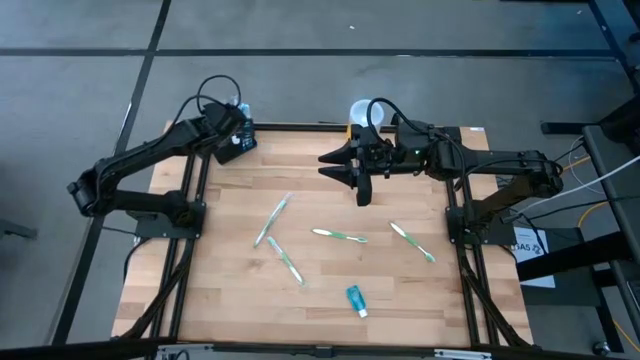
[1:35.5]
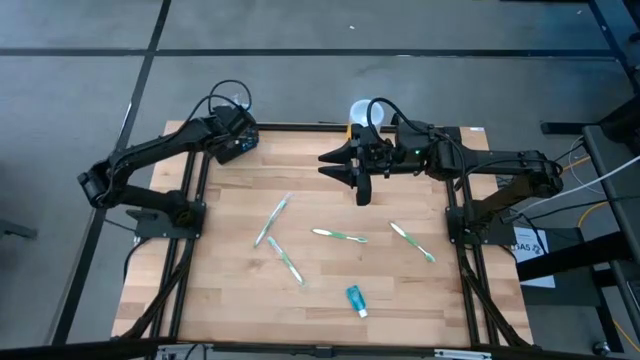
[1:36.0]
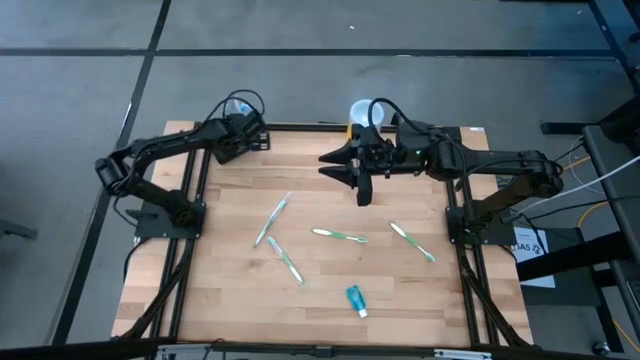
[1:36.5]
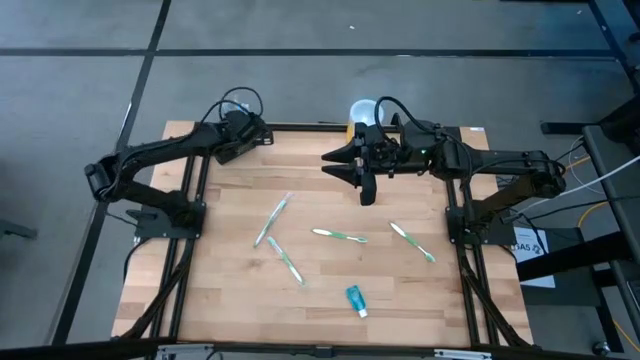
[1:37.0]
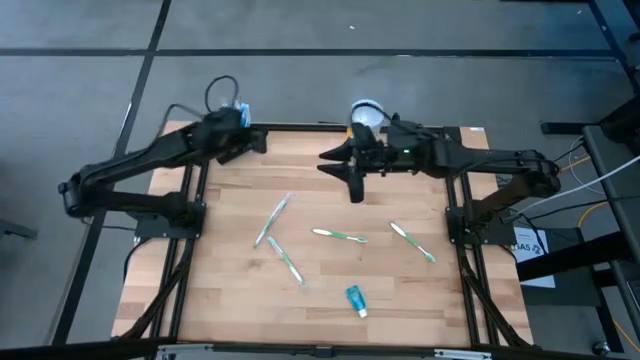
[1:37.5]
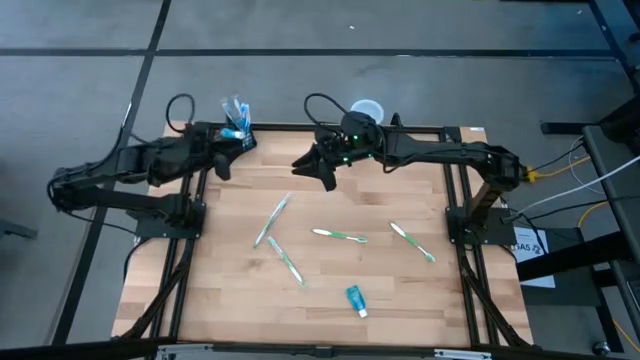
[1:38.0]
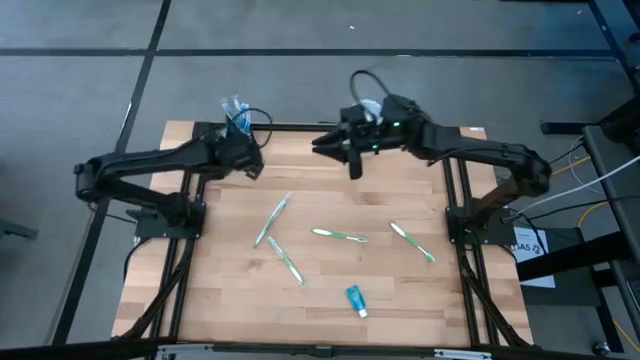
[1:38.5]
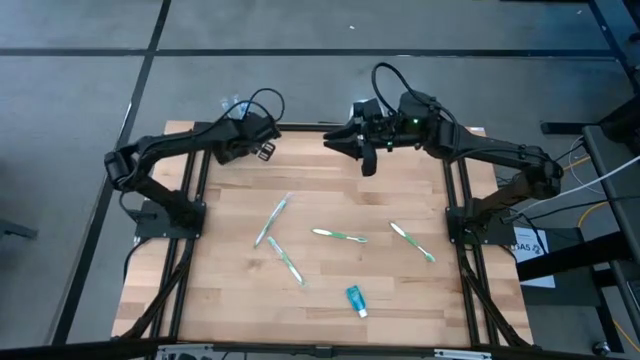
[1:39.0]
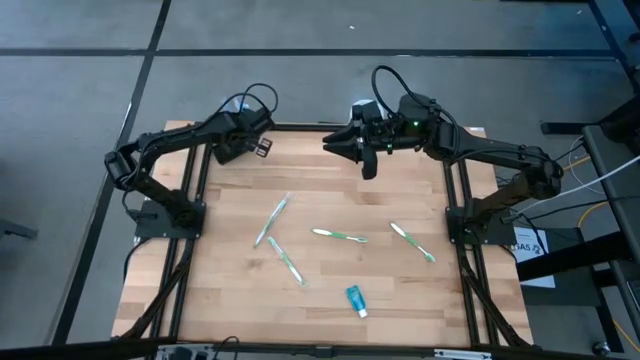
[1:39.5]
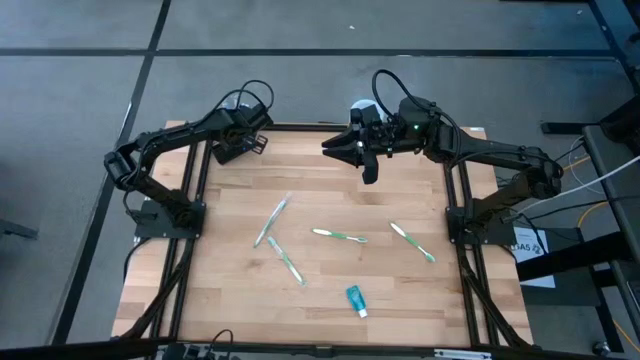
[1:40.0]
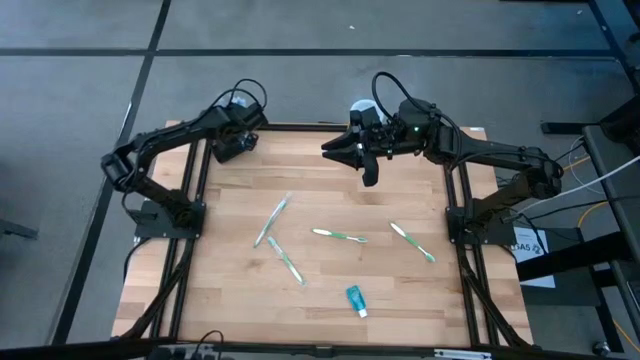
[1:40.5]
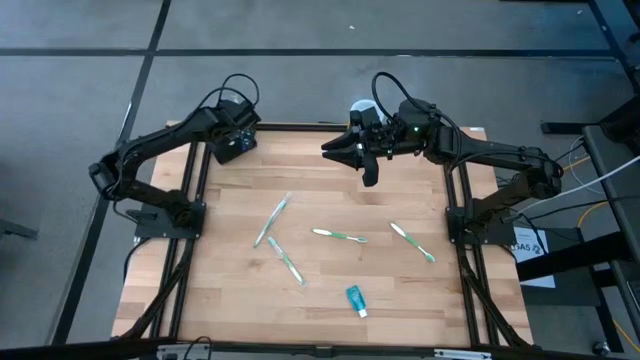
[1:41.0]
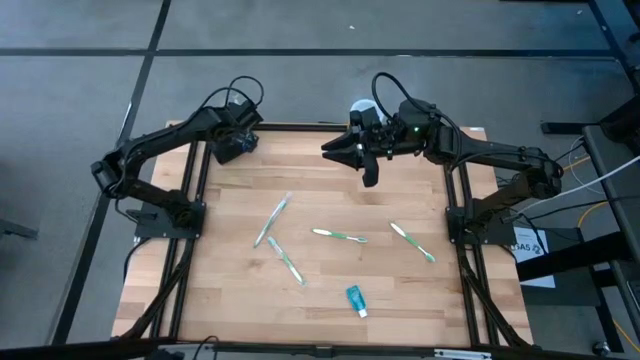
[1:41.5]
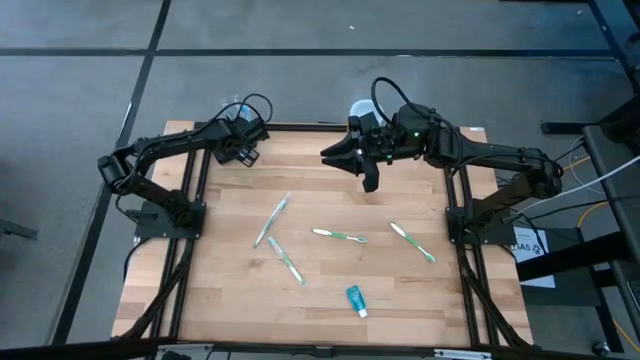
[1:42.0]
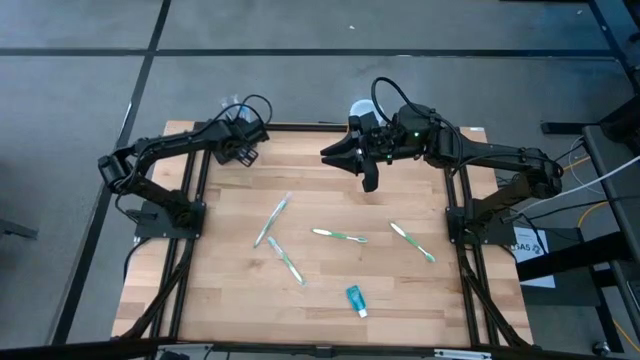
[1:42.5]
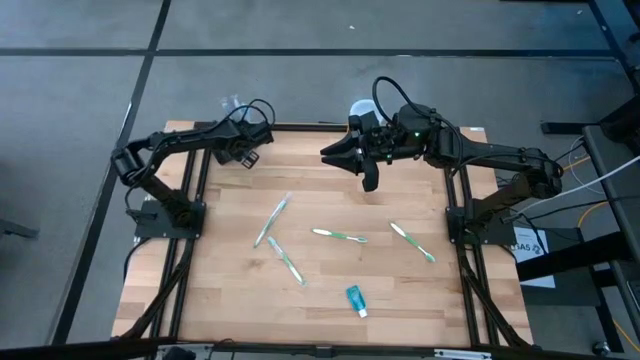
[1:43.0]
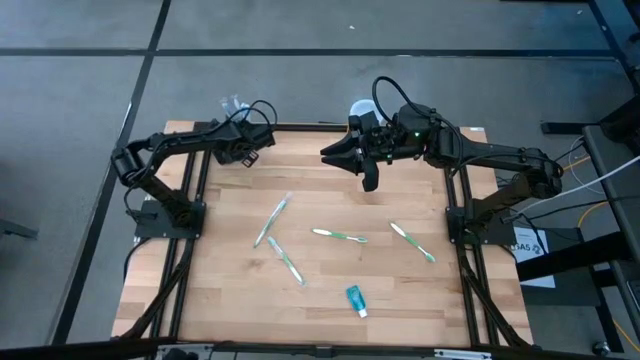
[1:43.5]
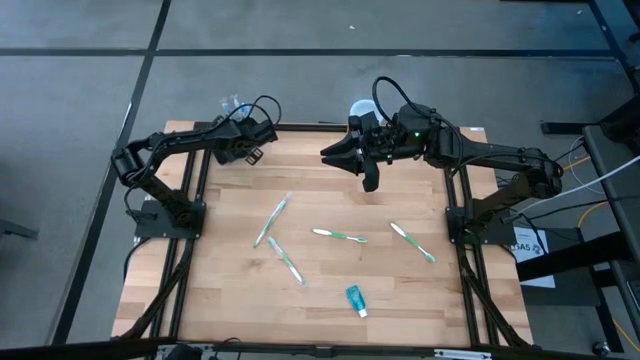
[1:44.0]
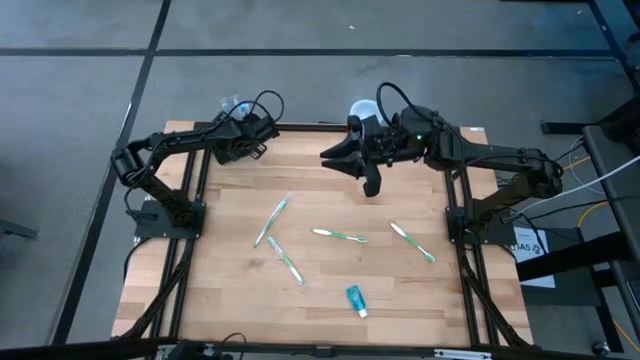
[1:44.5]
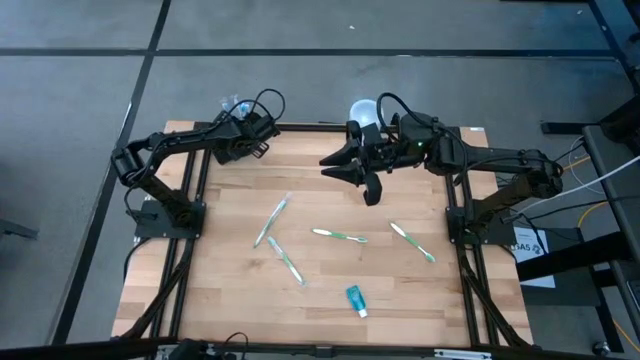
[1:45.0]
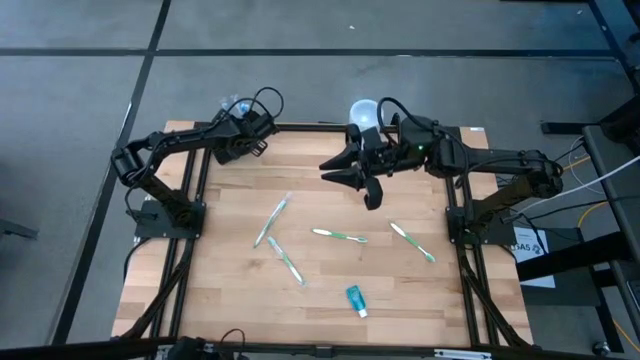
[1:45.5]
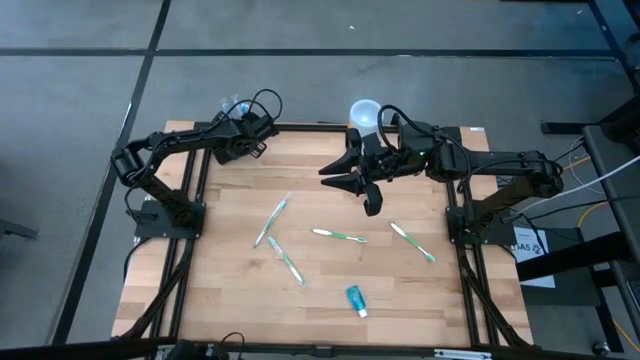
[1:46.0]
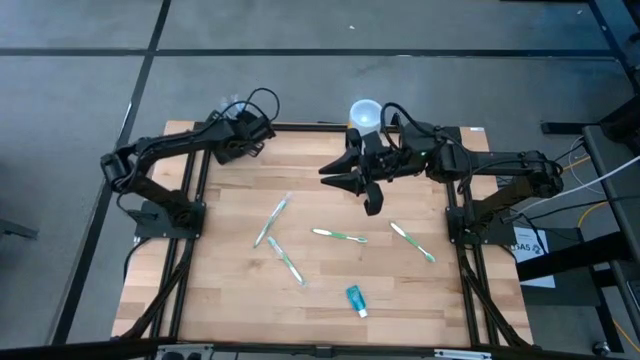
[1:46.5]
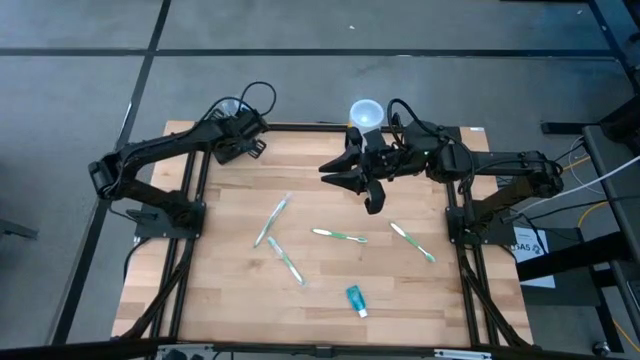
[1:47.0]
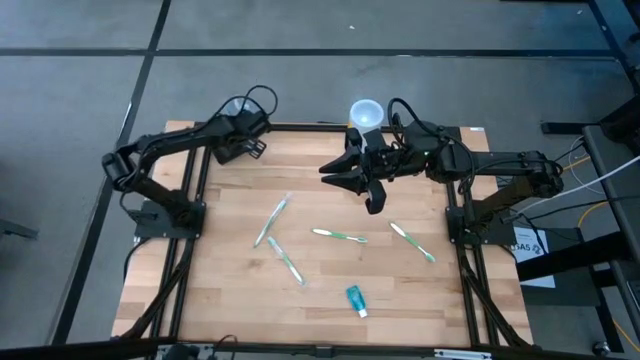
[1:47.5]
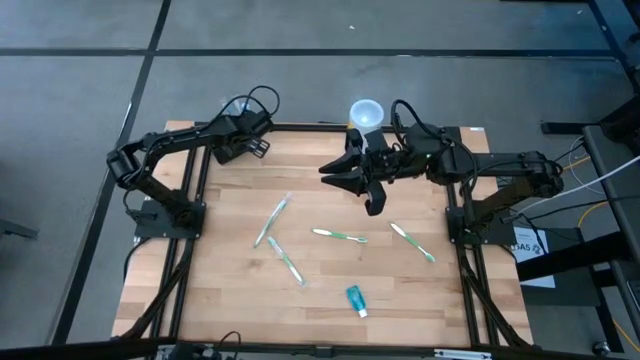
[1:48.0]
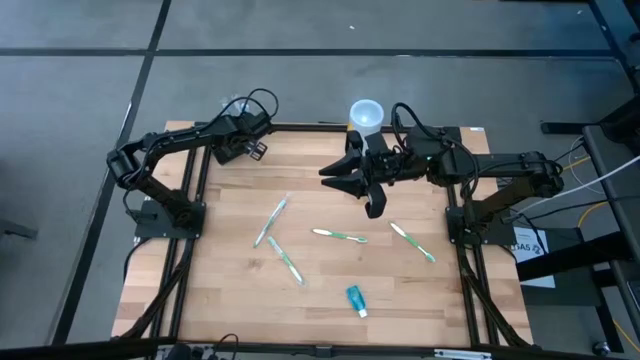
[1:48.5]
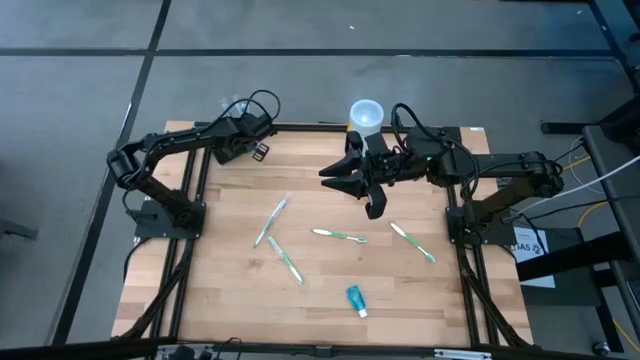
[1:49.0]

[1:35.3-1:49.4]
Task: Pick & Place toothbrushing station
Put the blue mouthwash bottle into the middle section of the black organizer

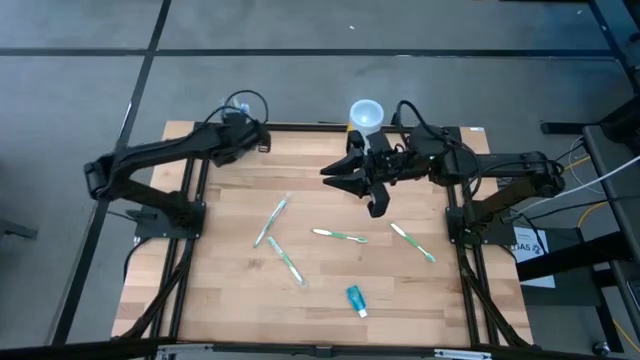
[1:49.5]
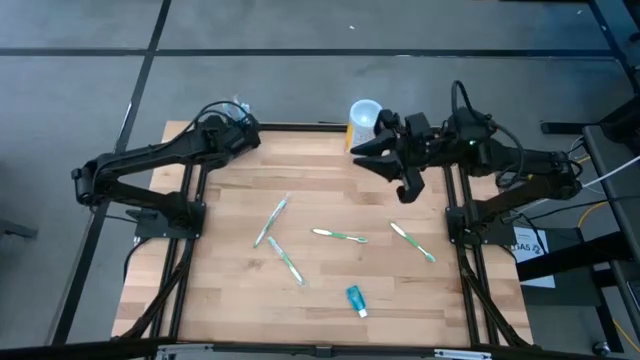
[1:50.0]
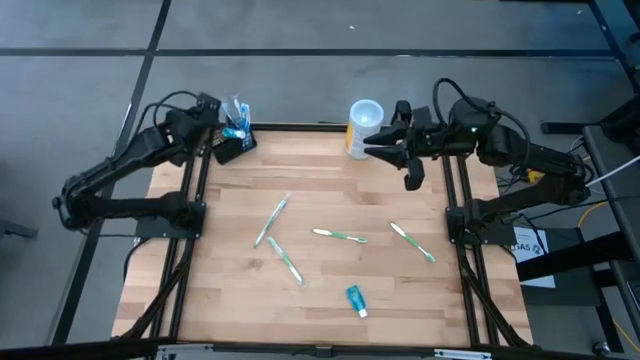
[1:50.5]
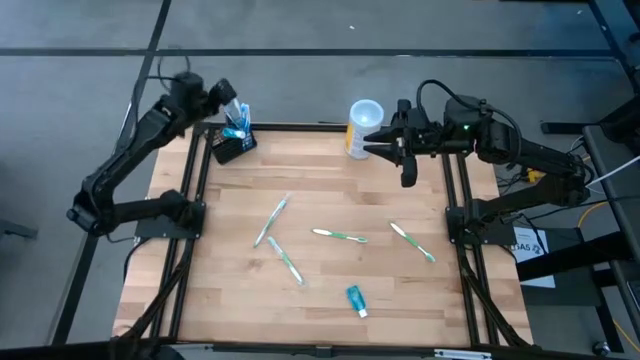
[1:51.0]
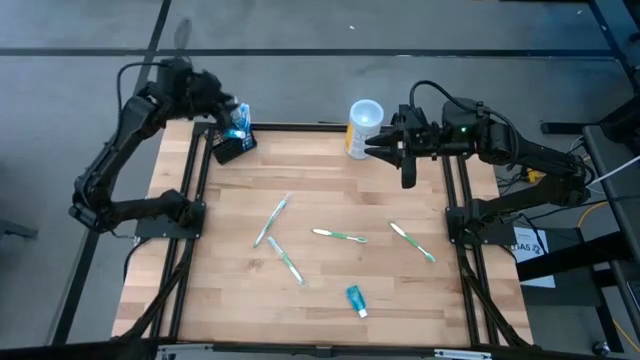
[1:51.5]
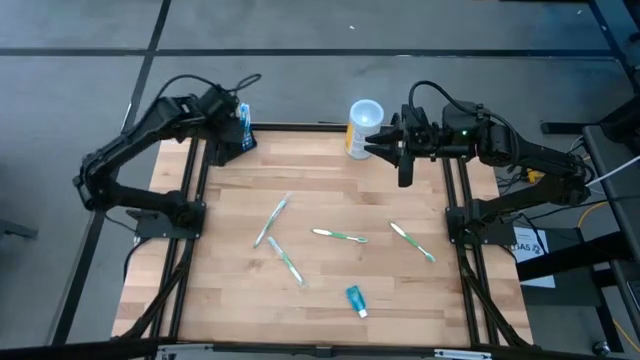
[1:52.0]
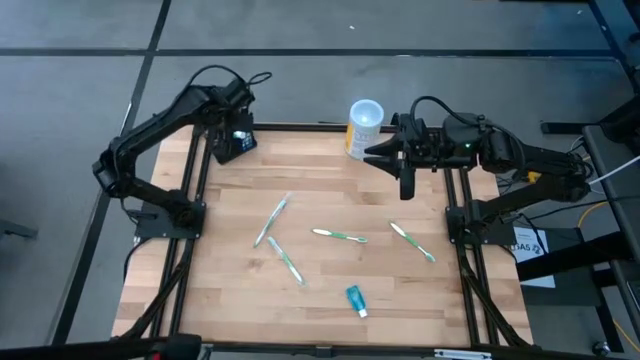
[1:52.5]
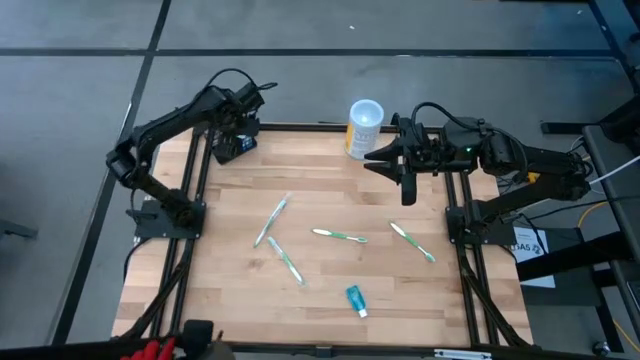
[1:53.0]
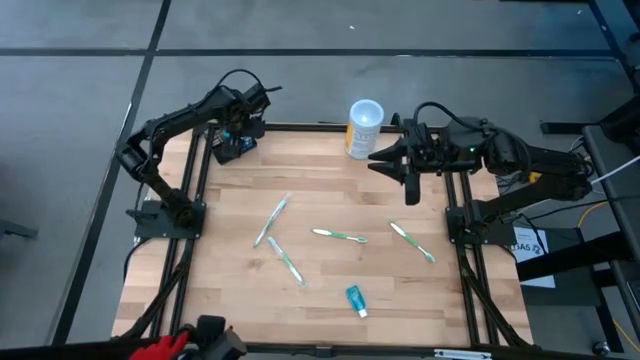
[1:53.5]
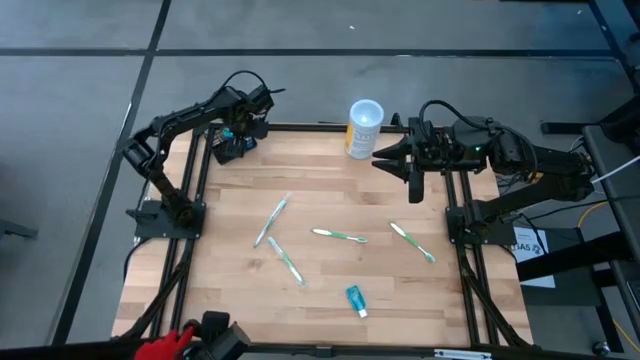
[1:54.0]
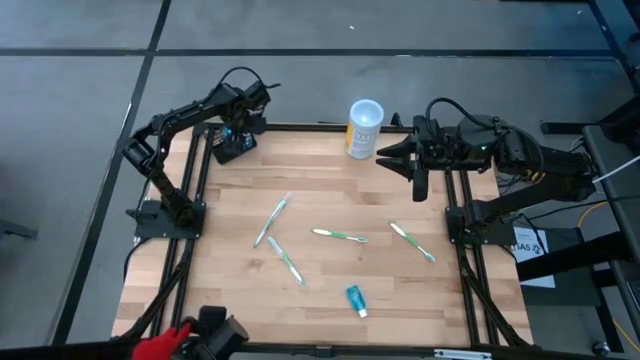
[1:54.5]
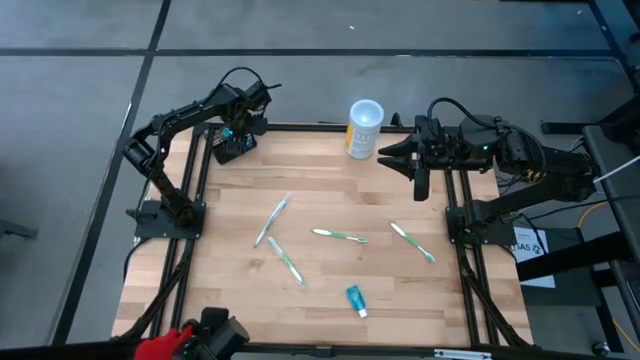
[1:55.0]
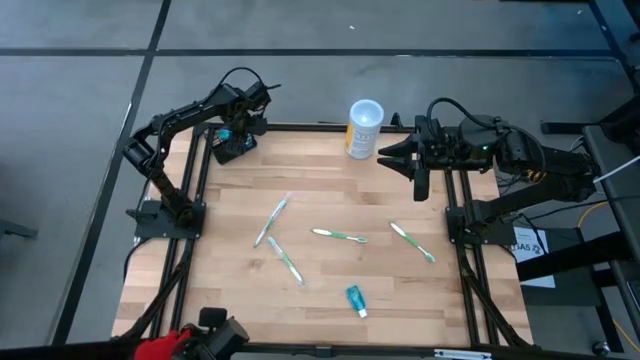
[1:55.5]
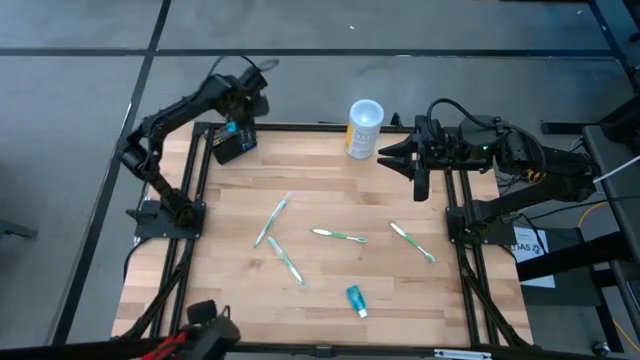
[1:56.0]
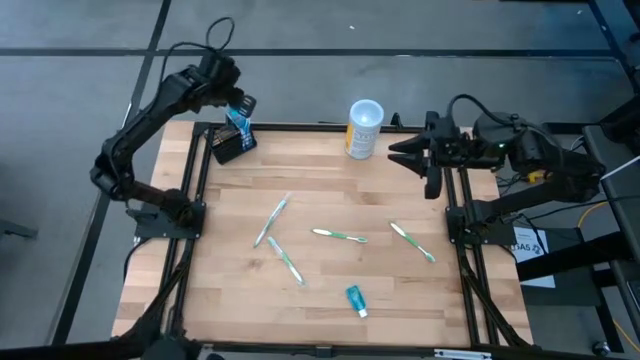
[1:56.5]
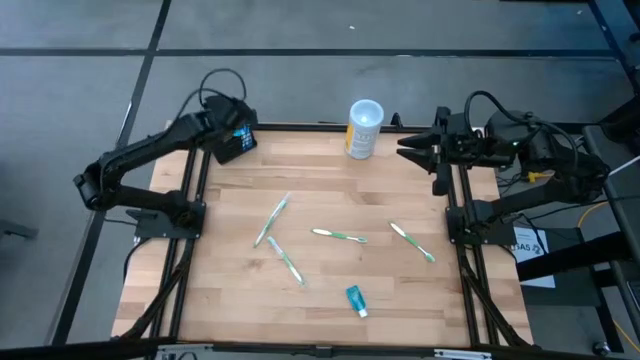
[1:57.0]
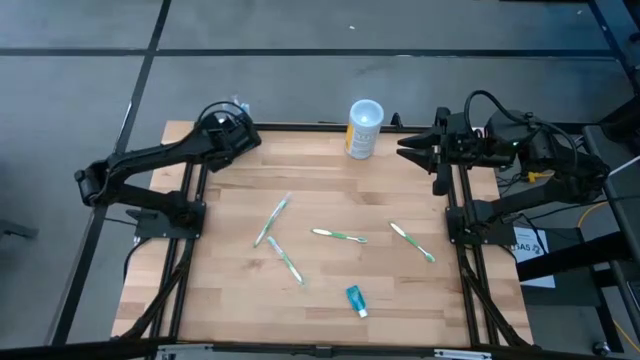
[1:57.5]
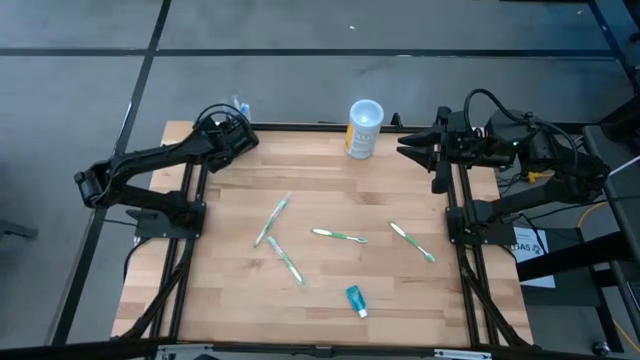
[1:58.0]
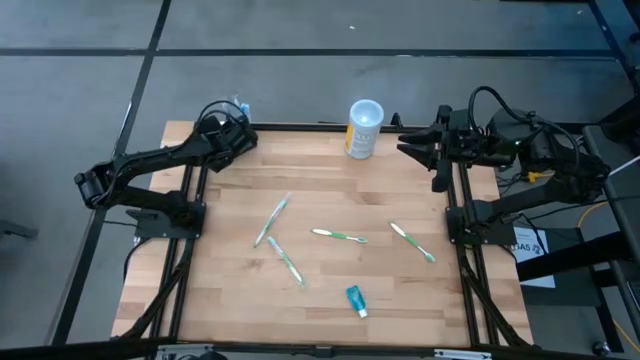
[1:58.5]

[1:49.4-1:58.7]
Put the blue mouthwash bottle into the middle section of the black organizer
